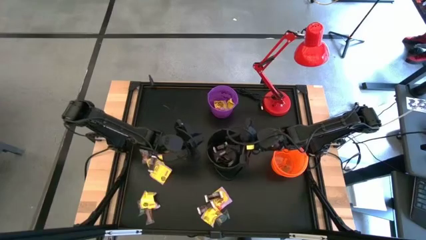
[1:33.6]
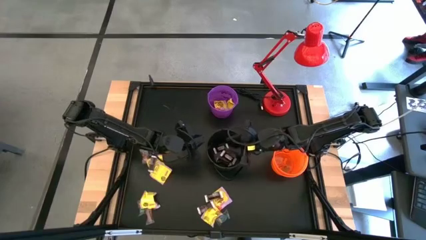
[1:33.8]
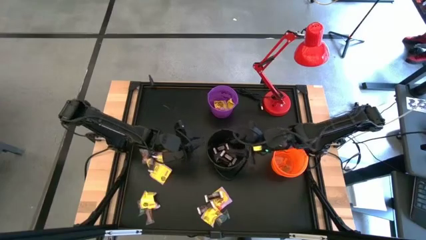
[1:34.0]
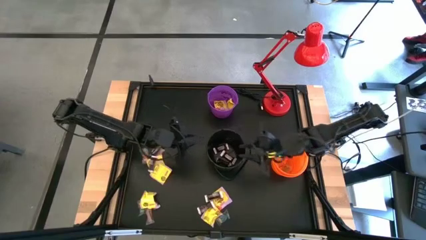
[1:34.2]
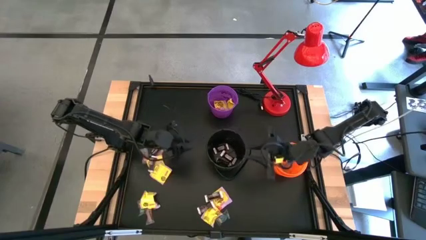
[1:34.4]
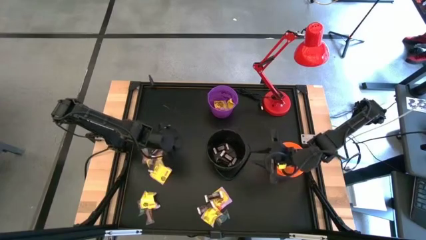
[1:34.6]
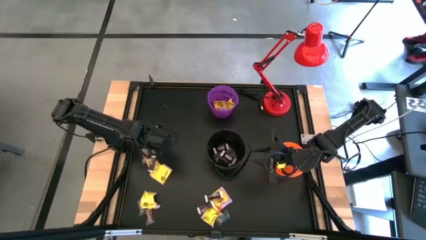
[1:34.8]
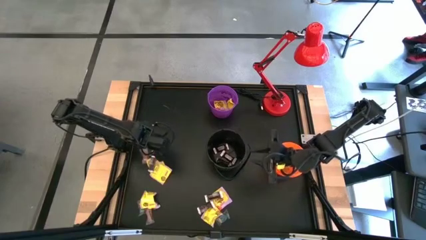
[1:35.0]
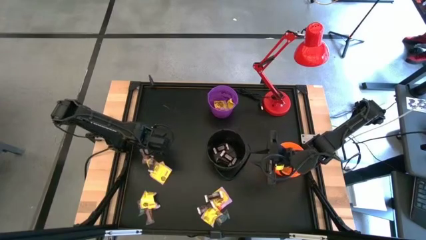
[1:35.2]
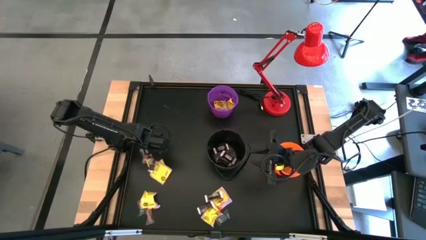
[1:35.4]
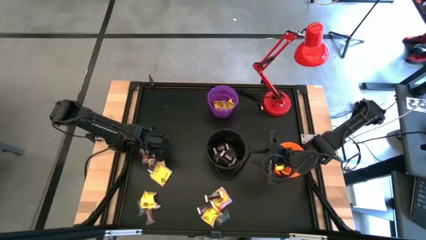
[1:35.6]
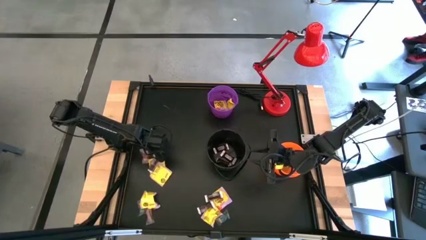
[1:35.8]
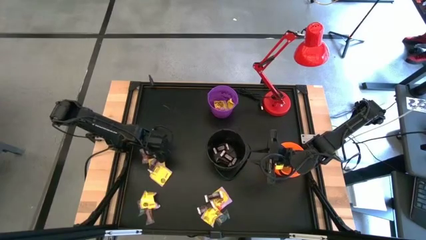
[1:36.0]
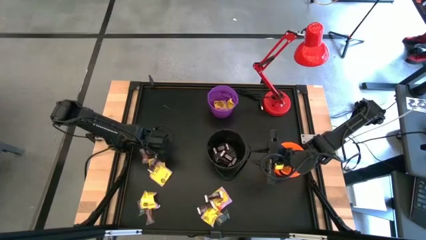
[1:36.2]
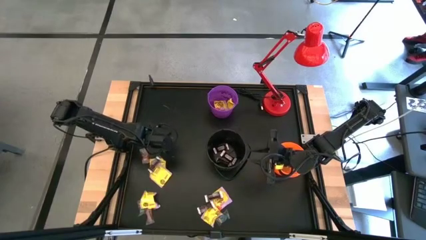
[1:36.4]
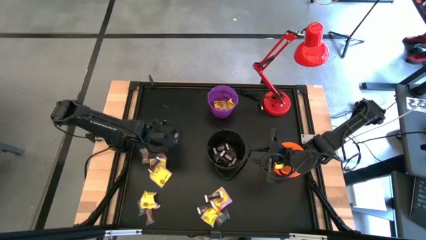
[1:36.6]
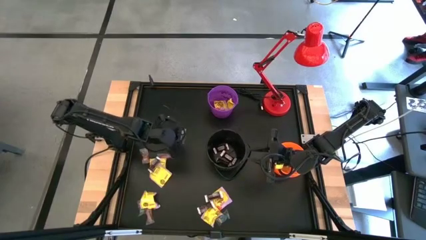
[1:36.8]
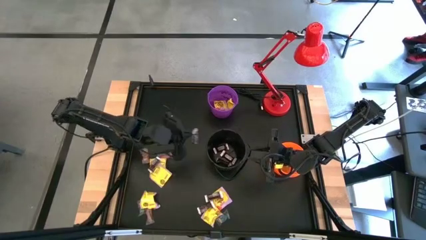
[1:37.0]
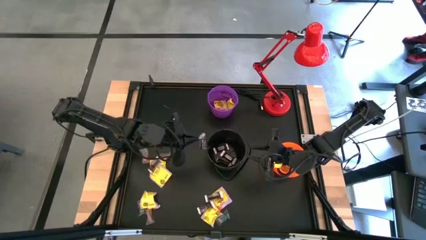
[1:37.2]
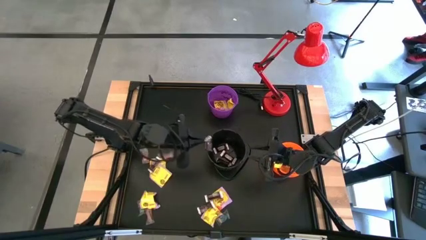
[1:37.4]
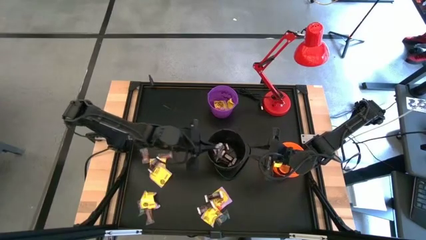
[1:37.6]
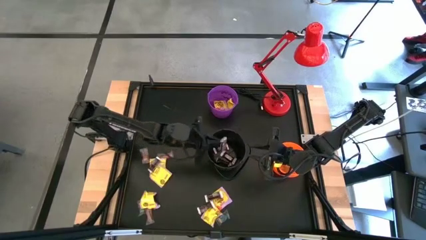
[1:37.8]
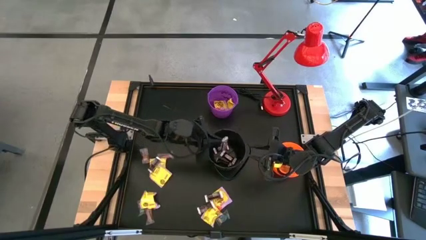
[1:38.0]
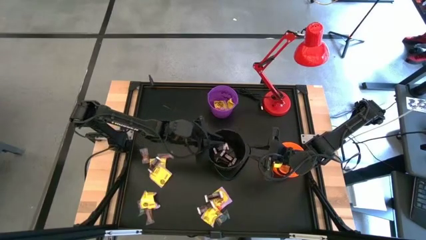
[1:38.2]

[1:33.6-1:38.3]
Task: Sort candy
Put the brown chocolate into the black bucket

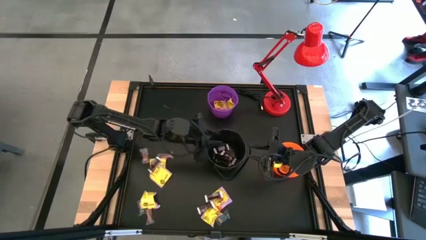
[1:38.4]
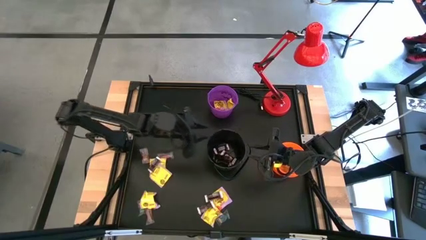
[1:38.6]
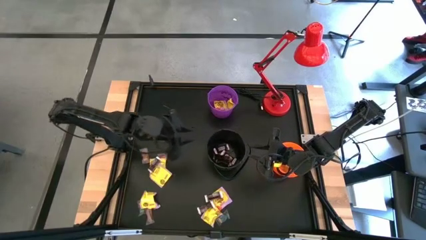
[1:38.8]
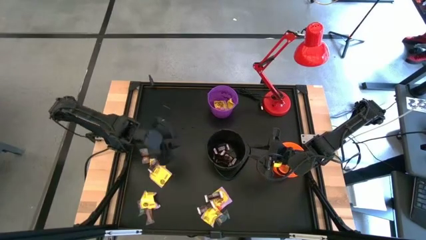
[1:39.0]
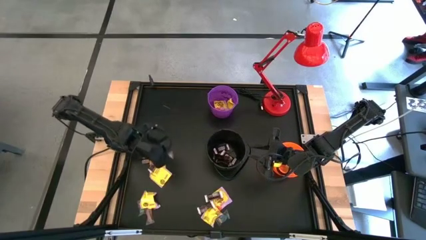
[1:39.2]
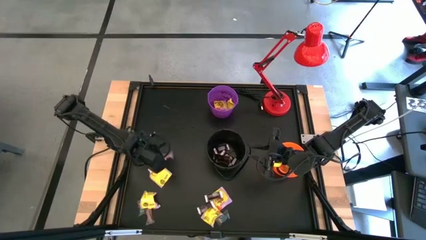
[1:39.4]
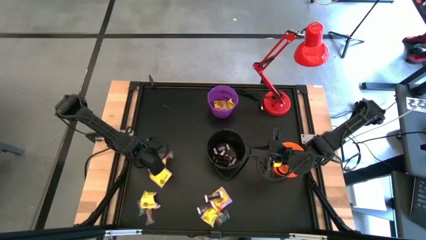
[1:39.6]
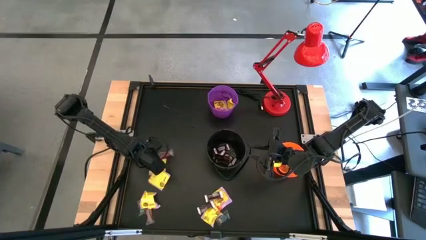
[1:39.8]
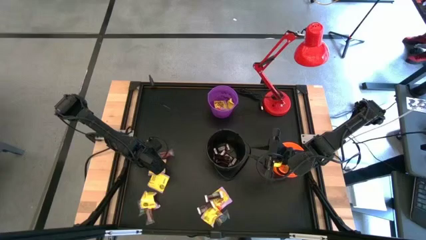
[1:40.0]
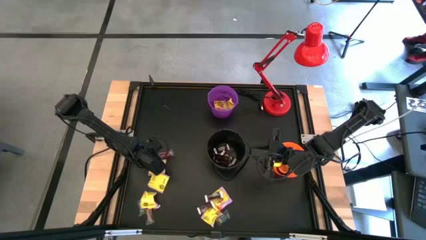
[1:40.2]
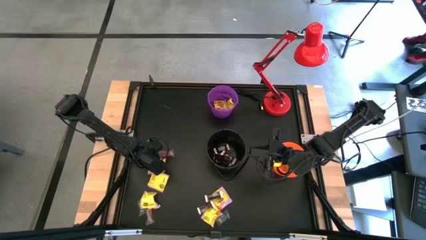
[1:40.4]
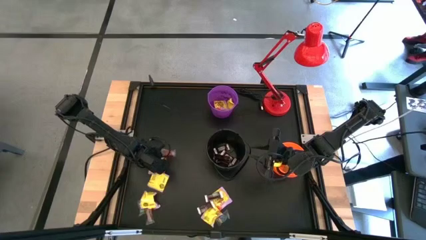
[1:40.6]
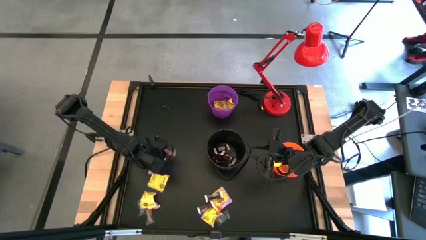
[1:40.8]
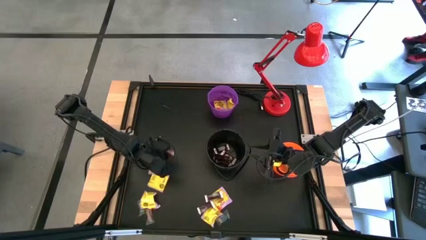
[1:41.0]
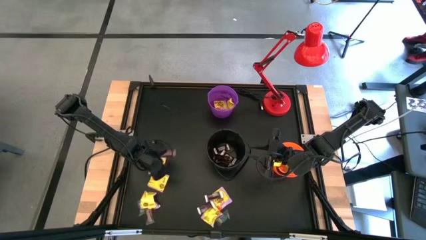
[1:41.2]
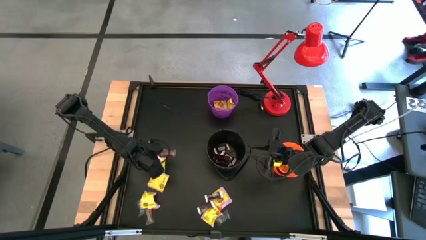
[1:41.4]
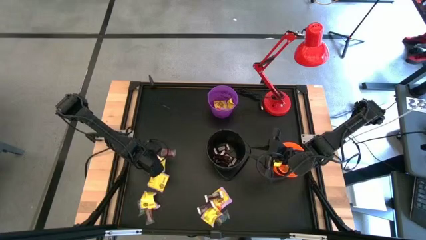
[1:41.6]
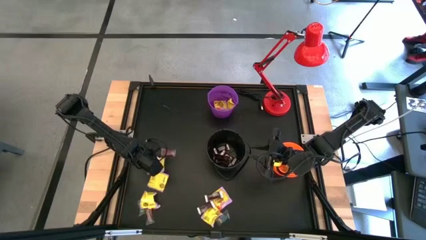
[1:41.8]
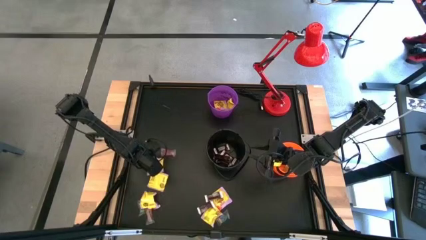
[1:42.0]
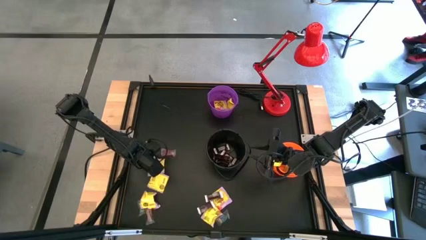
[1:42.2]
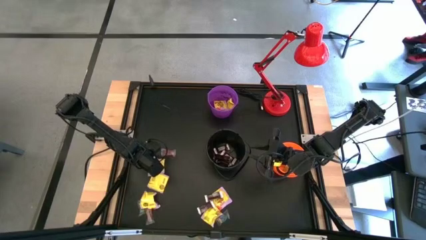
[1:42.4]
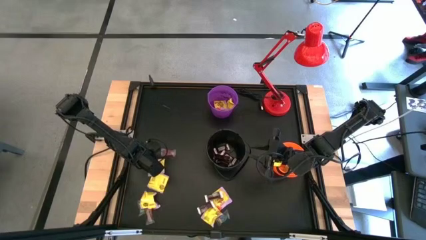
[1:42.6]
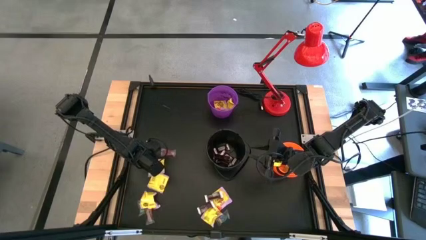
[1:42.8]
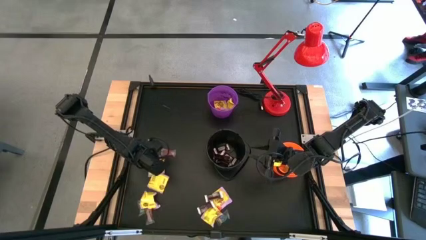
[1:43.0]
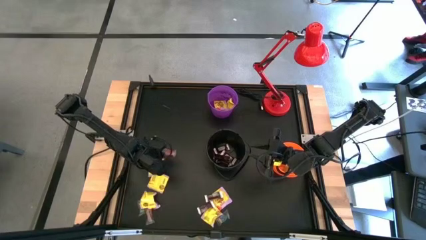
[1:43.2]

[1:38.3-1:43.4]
Put the brown chocolate into the black bucket

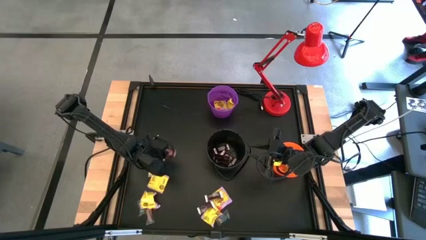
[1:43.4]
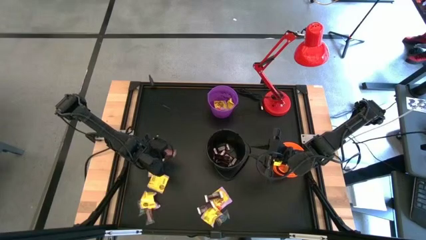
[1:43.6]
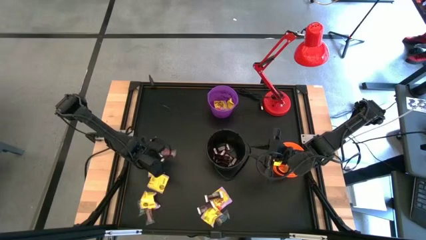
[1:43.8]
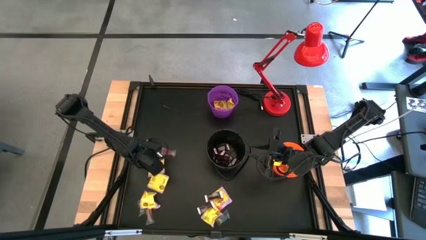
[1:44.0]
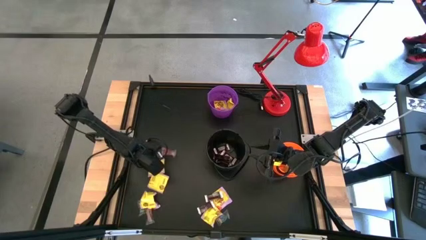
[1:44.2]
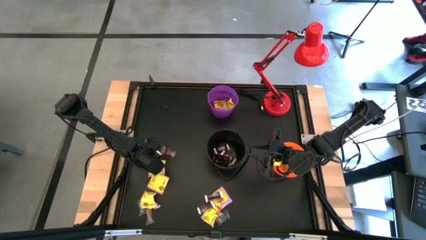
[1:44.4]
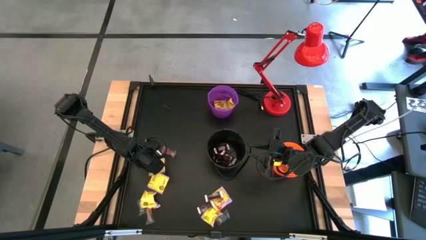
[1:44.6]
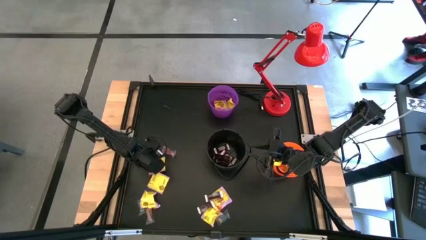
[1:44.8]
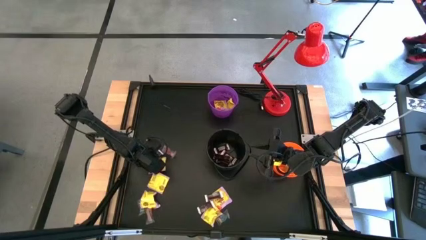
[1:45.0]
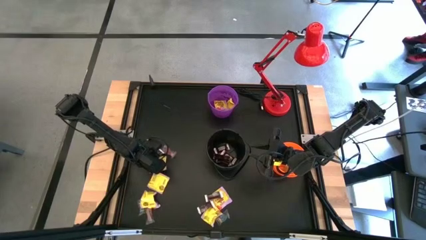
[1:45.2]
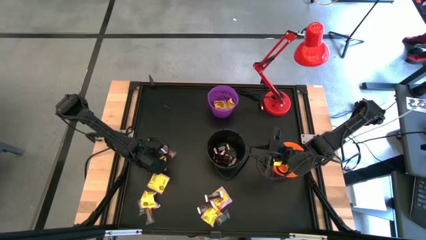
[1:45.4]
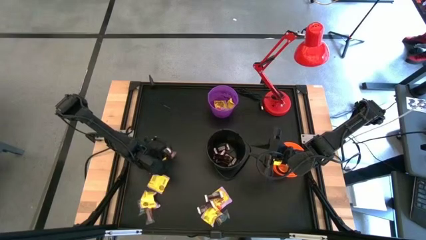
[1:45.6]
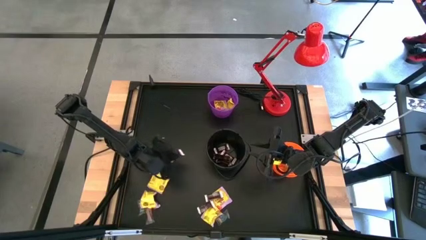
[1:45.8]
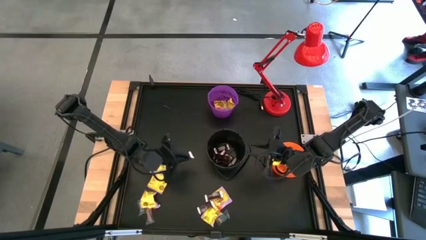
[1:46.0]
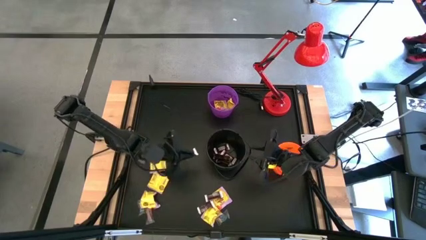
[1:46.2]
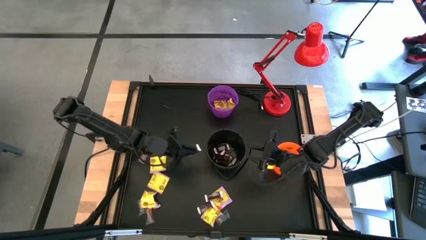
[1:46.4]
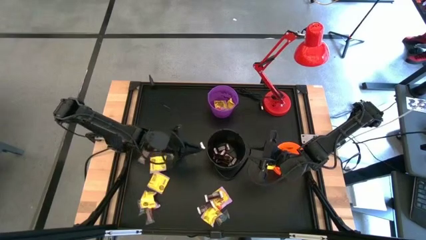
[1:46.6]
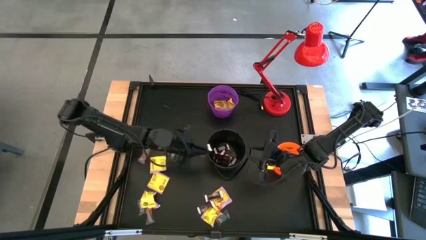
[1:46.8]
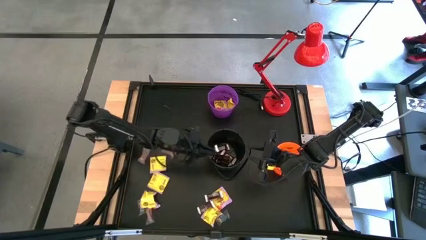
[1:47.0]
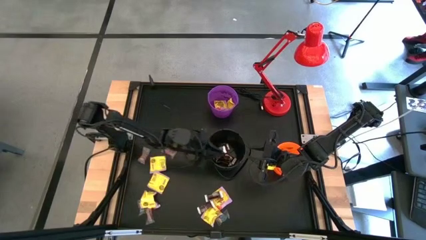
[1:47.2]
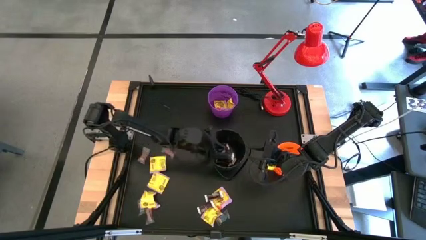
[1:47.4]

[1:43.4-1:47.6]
Put the brown chocolate into the black bucket

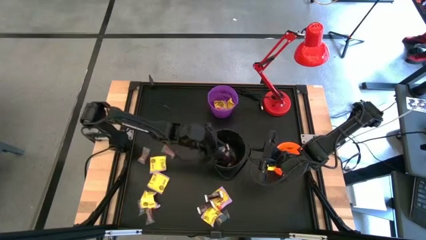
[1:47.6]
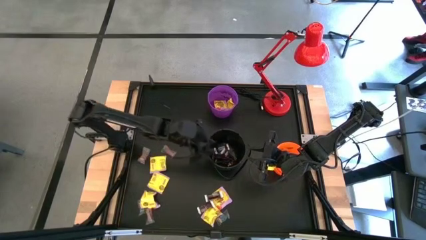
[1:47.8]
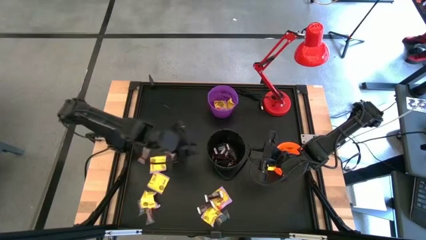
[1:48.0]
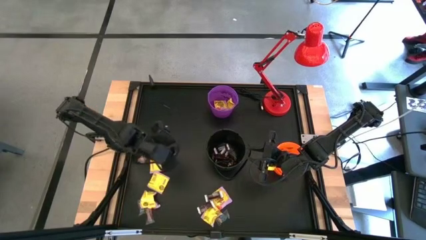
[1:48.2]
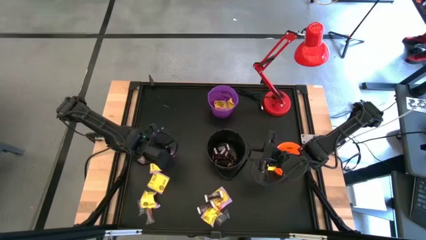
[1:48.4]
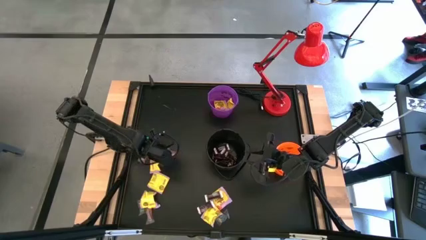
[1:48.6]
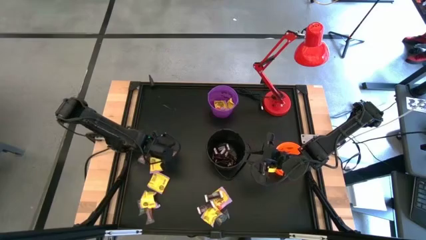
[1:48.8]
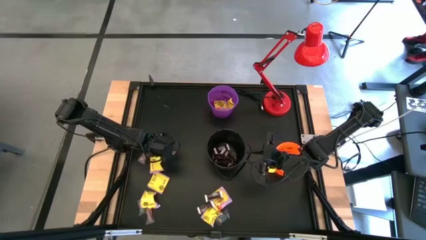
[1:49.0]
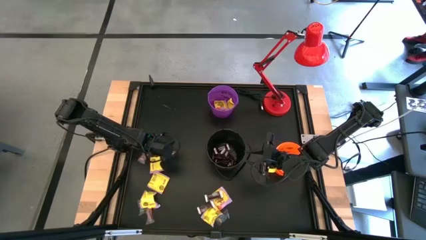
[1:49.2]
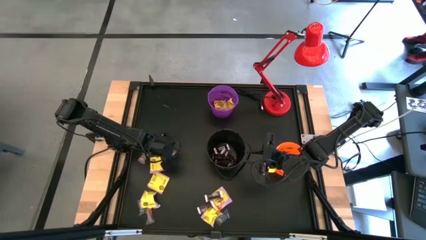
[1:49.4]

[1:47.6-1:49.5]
Put the orange gummy into the orange bucket
